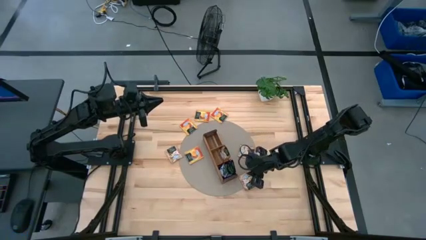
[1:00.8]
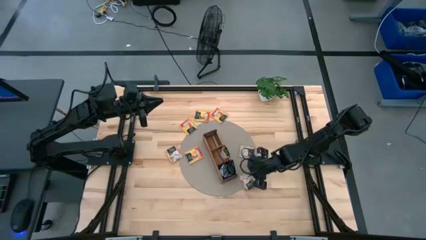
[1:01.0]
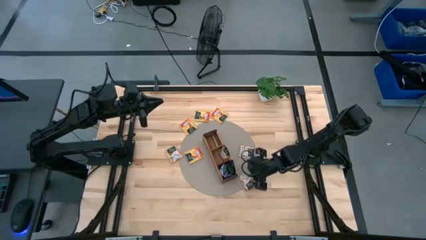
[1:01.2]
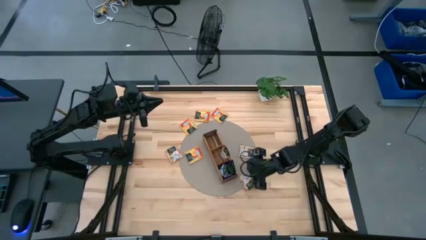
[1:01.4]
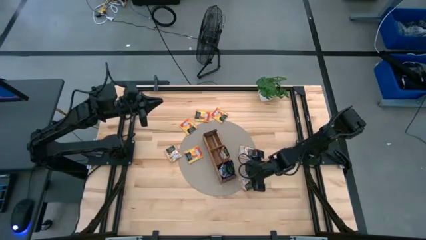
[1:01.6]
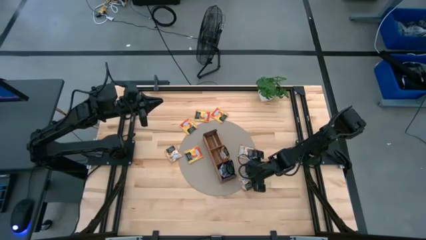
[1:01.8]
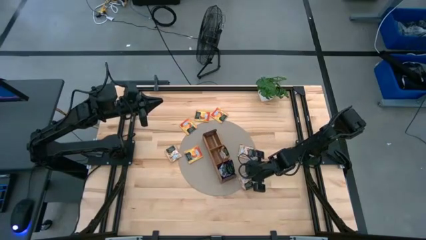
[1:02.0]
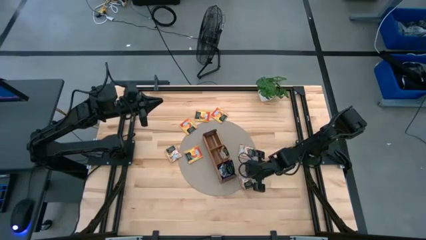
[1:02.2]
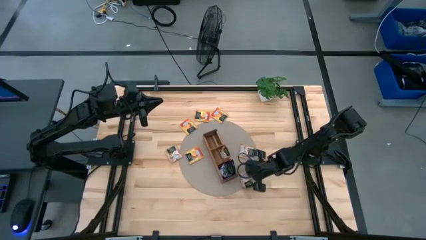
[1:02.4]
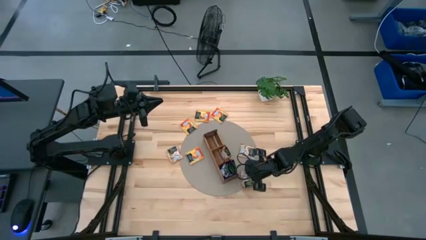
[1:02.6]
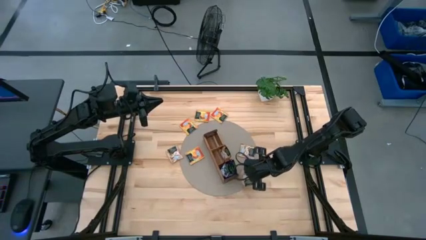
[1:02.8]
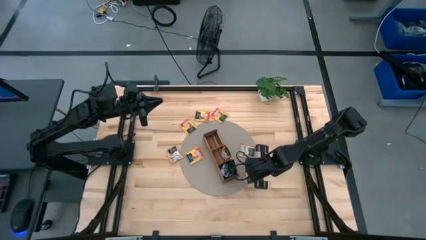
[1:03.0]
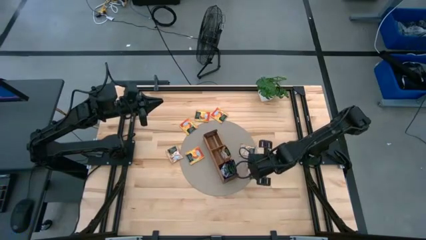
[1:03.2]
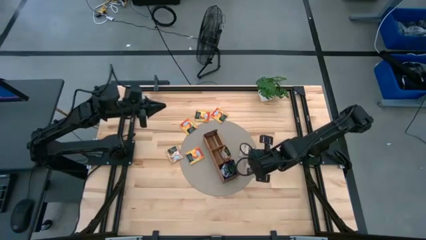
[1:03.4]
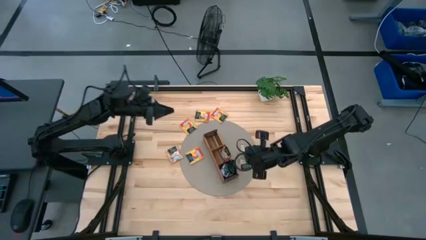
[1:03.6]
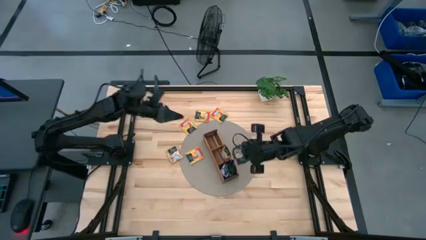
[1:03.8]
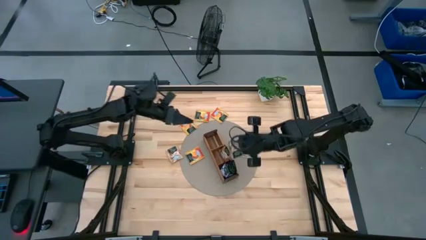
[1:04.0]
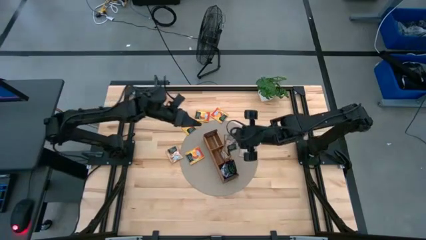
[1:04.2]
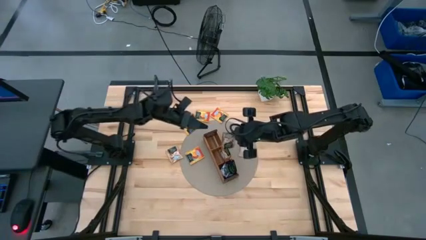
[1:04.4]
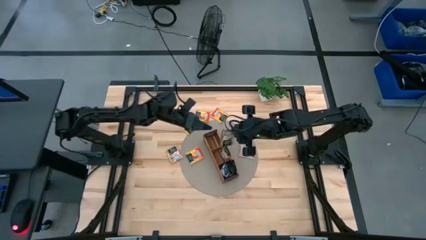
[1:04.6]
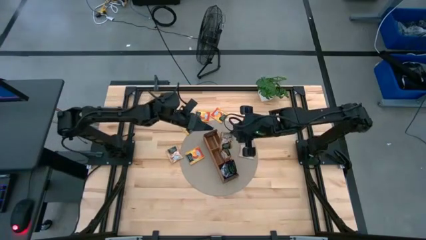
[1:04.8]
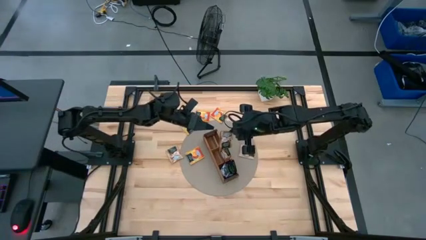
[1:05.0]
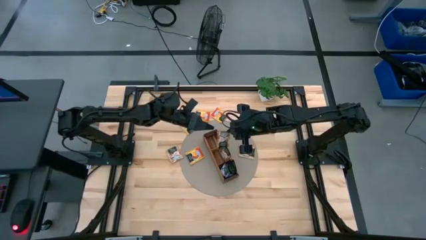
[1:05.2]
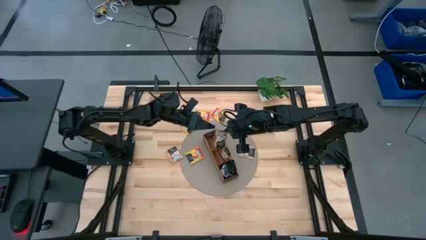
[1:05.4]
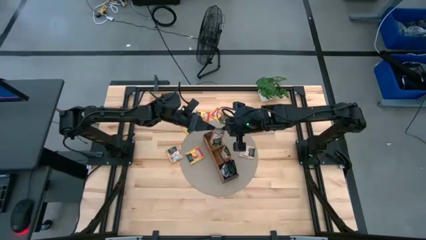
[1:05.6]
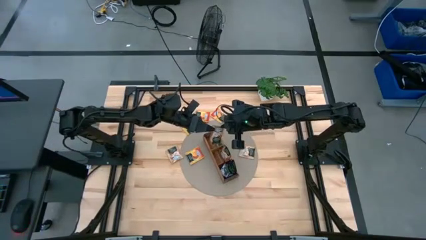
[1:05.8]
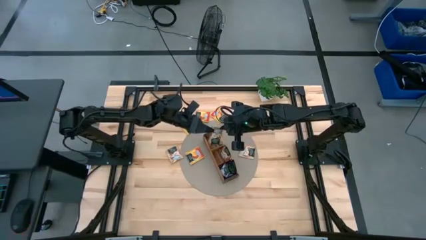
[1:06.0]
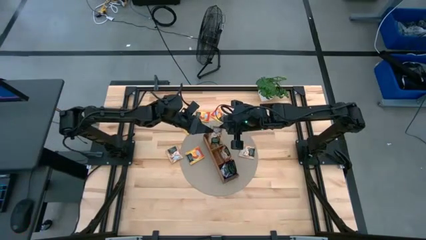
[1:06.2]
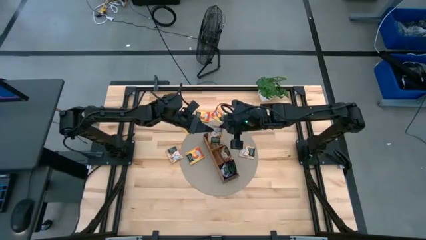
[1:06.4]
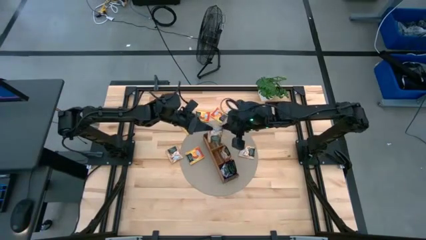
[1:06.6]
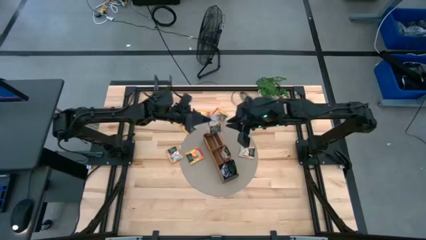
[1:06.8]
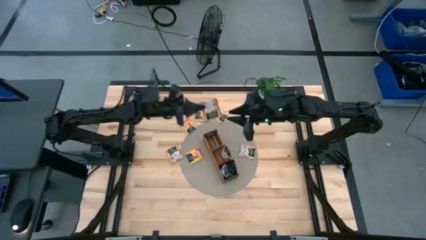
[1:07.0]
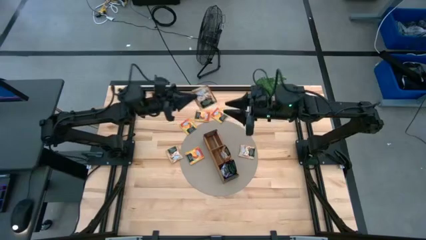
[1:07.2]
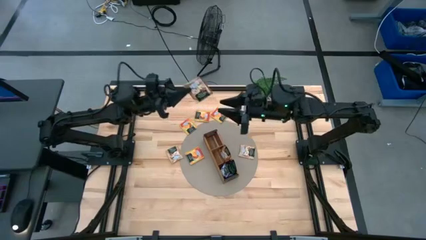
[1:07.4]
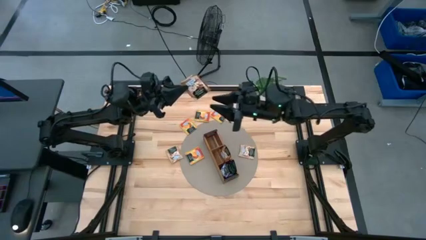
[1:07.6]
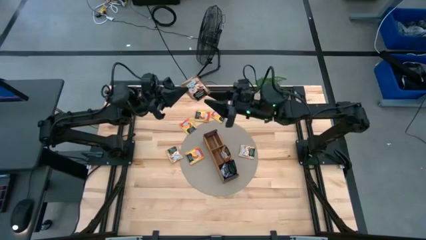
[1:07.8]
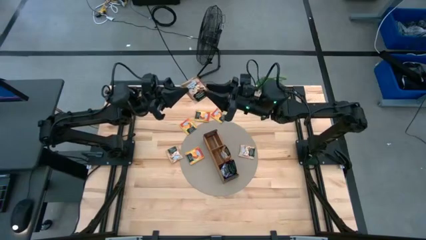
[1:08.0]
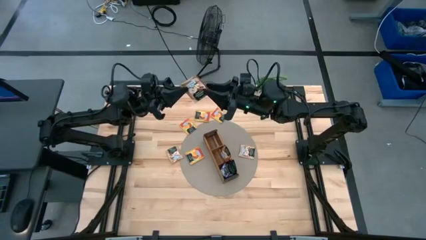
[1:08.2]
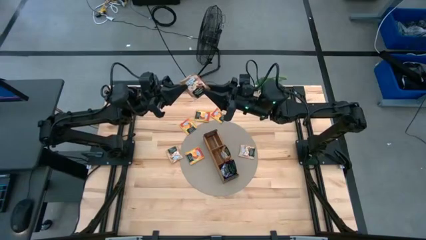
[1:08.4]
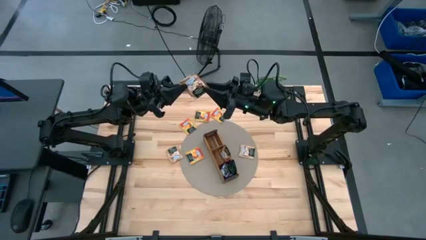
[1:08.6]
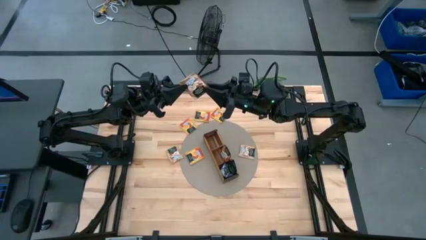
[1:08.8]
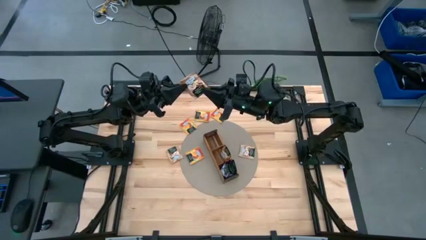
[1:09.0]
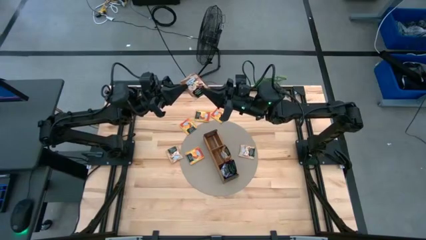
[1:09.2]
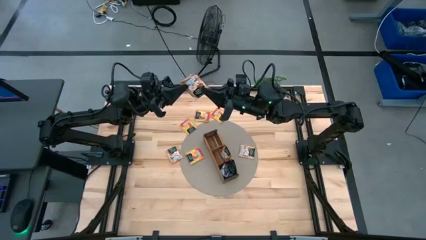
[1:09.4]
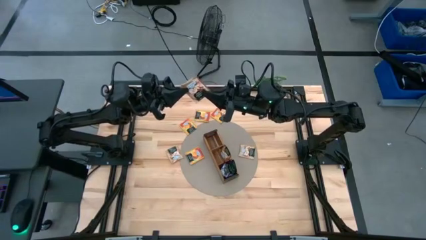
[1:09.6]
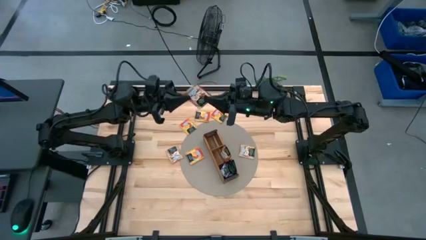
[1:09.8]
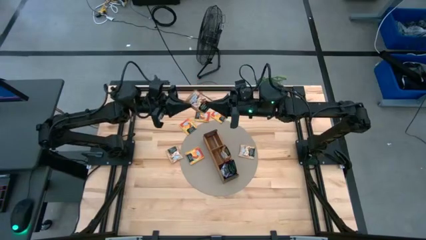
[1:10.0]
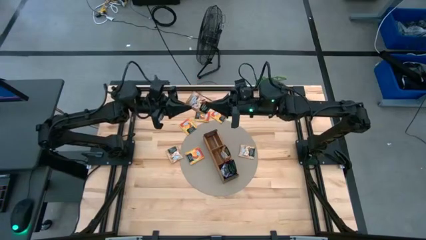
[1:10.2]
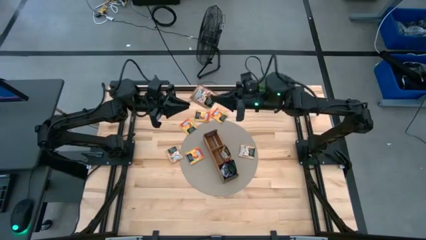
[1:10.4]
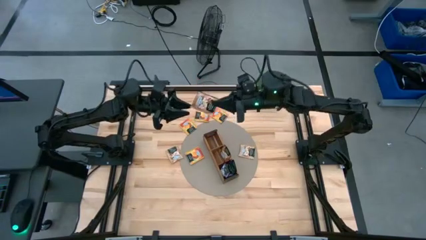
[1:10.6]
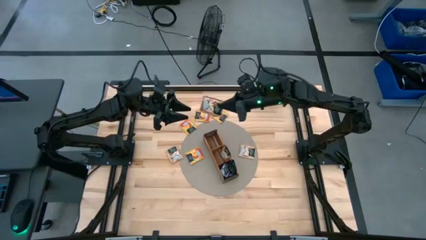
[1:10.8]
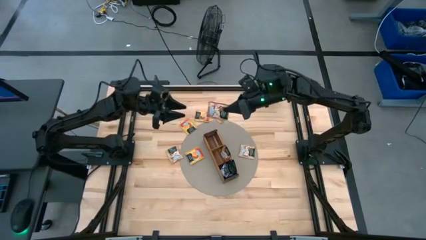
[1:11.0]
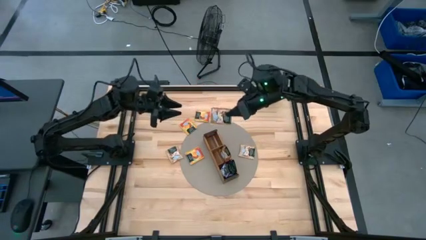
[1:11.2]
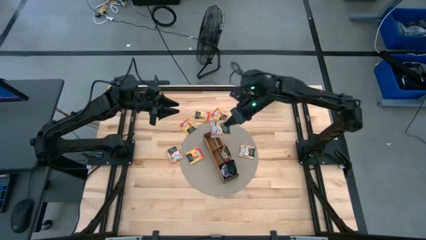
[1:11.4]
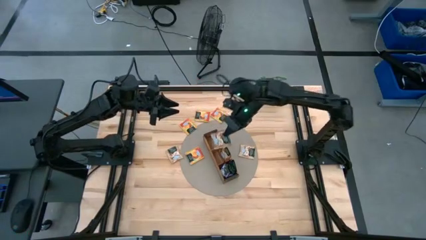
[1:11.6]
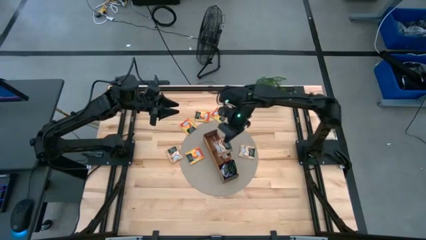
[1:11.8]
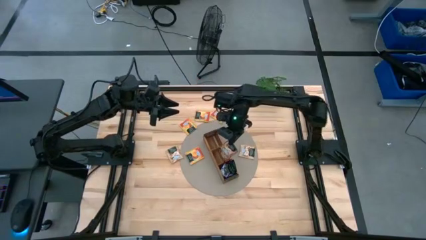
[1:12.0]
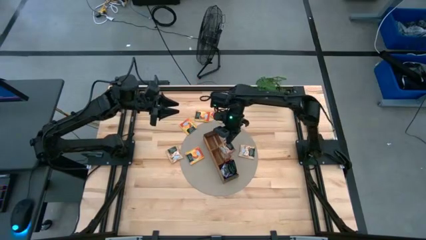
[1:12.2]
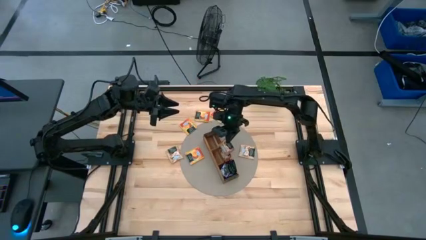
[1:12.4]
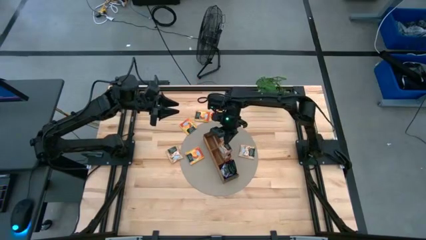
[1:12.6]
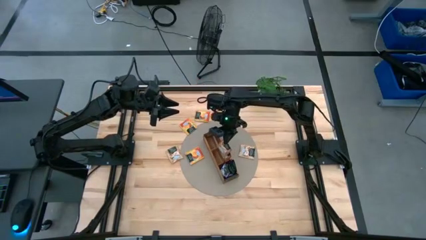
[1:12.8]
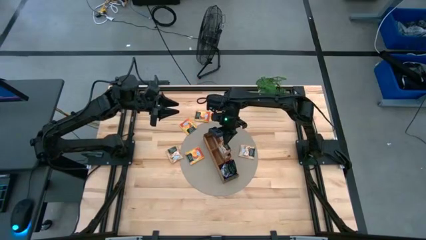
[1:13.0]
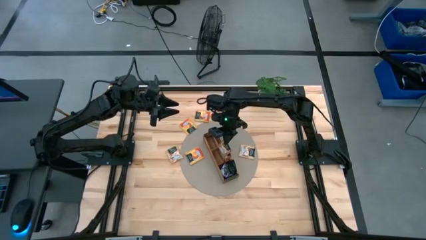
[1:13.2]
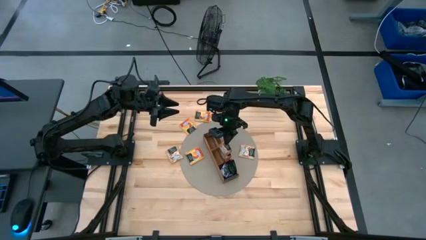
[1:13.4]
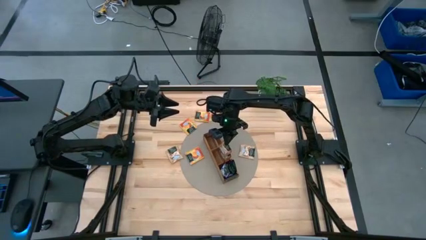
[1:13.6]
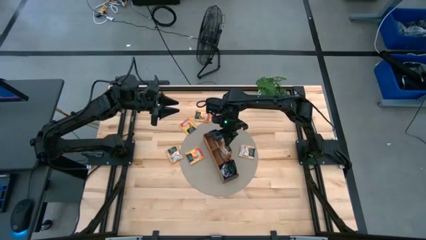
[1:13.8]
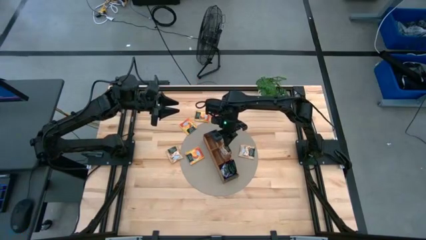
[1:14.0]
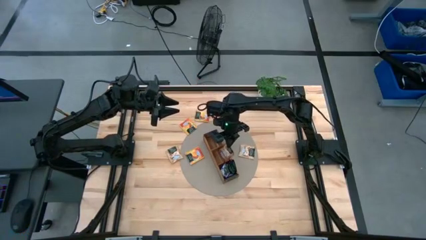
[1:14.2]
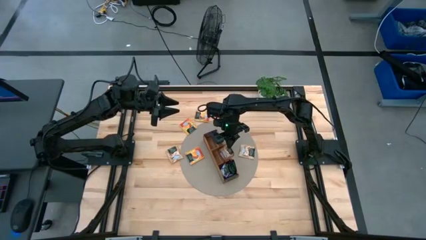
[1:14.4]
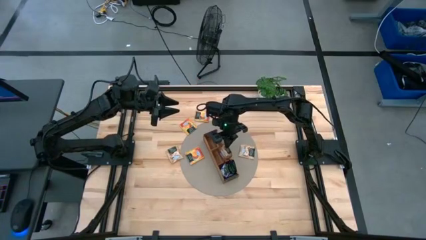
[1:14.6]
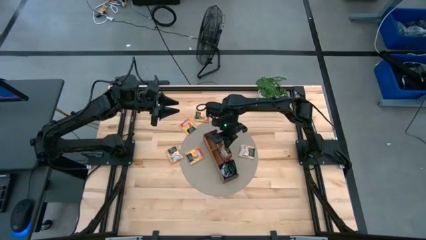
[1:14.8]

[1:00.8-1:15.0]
Task: Pick & Place Tea
Put the brown tea bag into the middle section of the wooden organizer

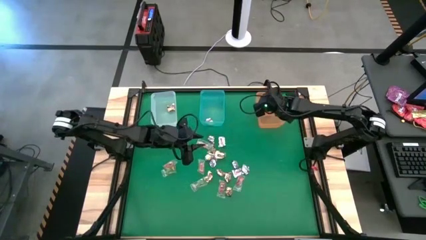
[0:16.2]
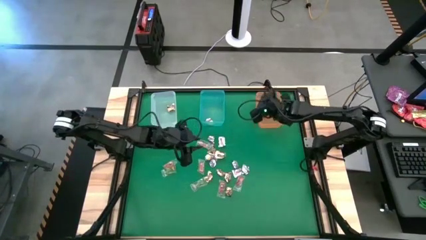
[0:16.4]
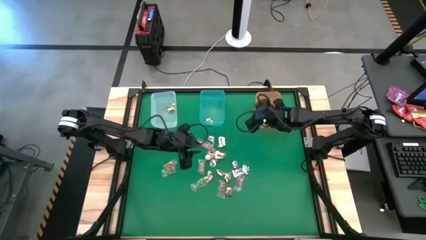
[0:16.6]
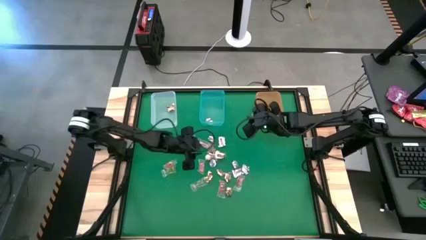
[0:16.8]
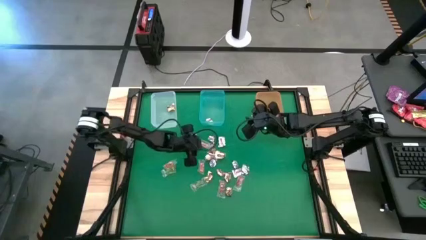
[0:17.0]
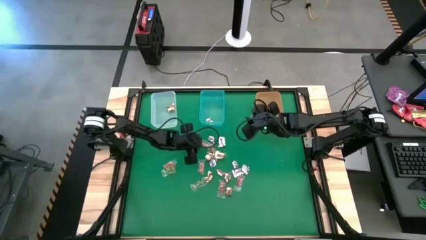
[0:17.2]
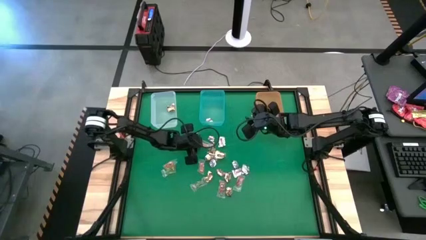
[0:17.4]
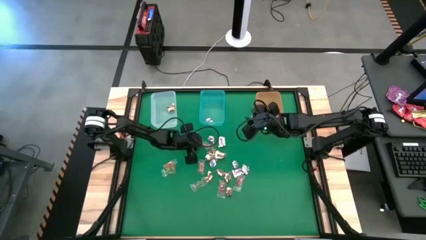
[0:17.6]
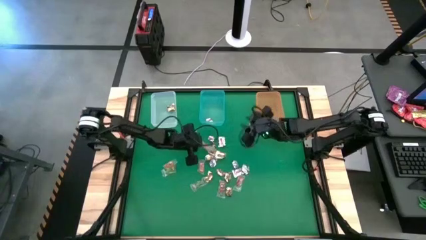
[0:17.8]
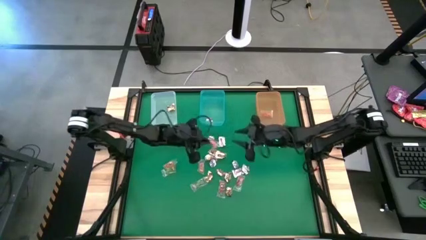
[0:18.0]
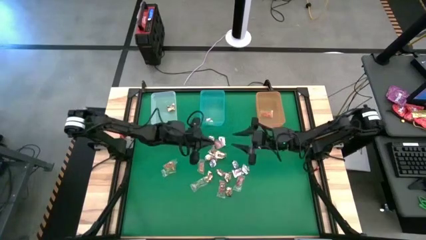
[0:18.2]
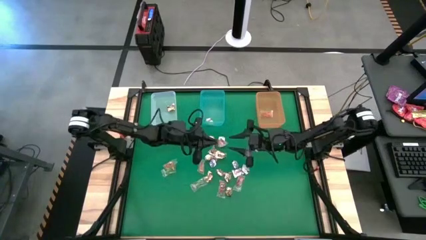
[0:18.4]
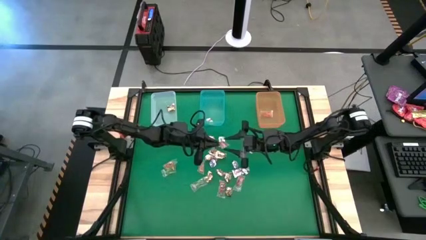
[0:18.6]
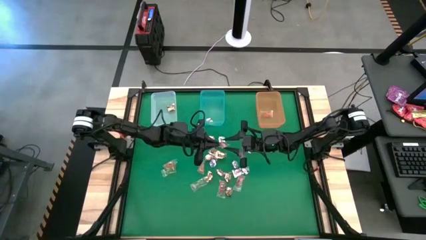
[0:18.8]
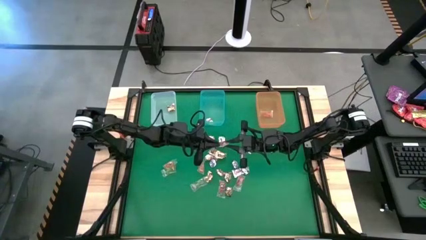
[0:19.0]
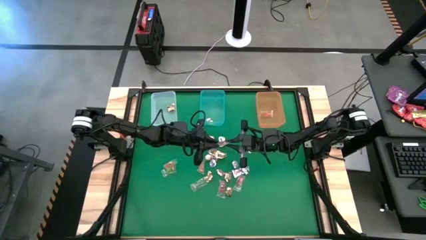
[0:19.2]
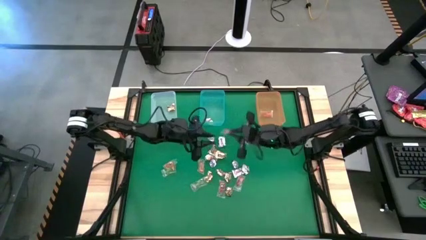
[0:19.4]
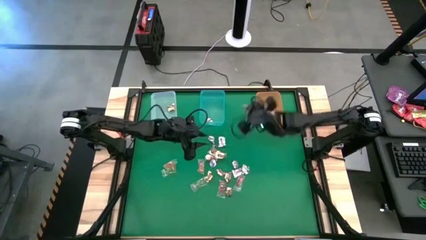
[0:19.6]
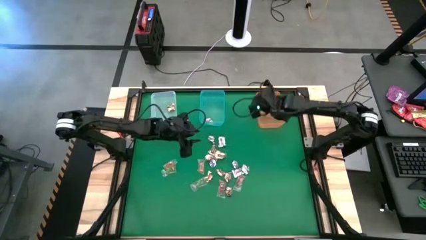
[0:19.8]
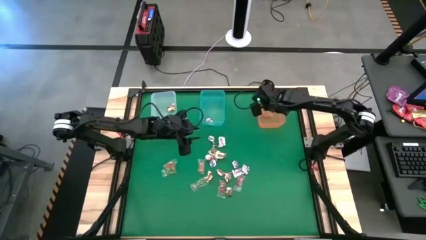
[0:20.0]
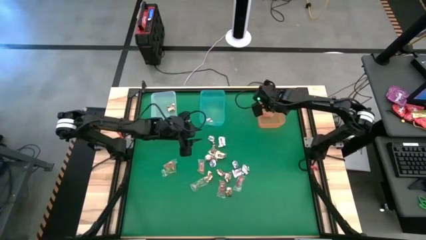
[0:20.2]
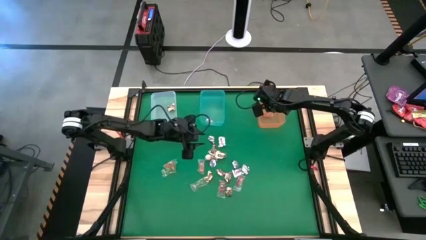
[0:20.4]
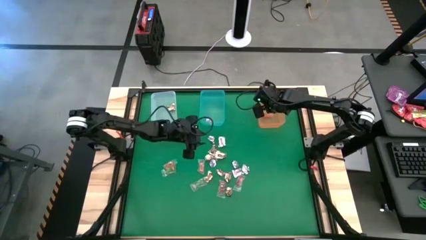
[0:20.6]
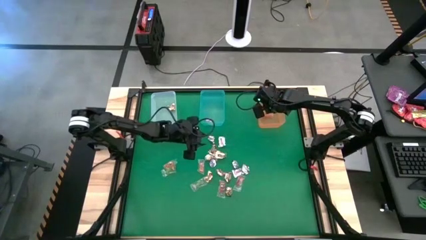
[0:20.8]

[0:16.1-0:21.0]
Task: Sort candy by brand, put in halloween buckets
Put the orange gummy into the orange bin
